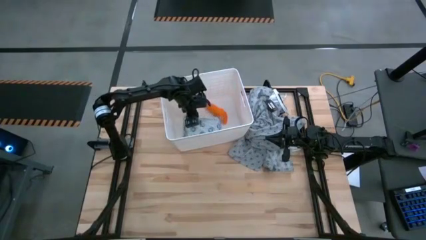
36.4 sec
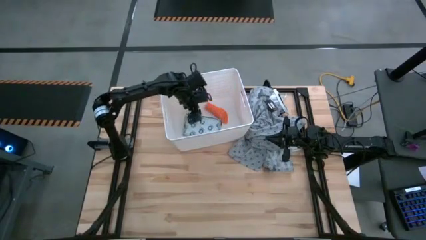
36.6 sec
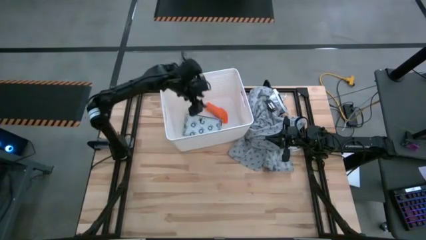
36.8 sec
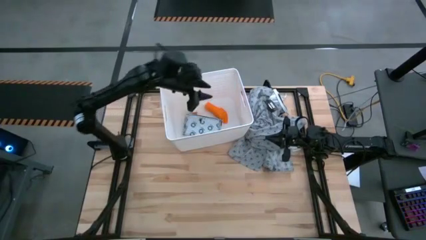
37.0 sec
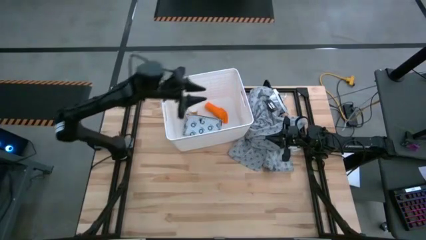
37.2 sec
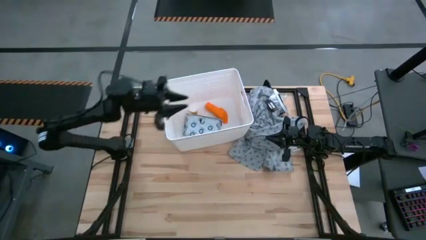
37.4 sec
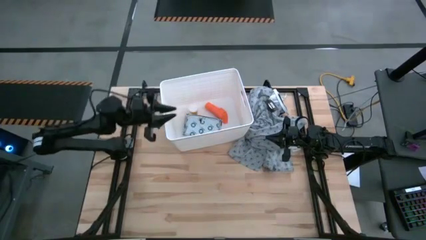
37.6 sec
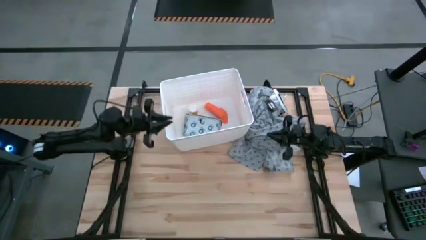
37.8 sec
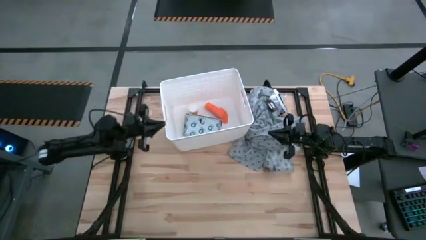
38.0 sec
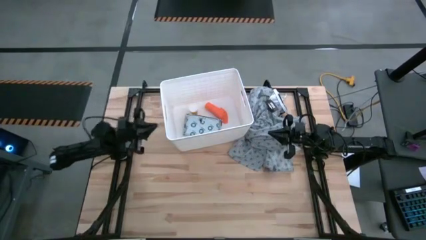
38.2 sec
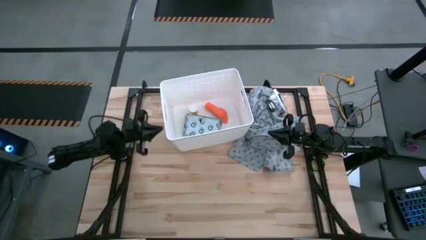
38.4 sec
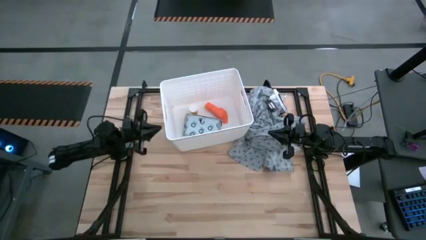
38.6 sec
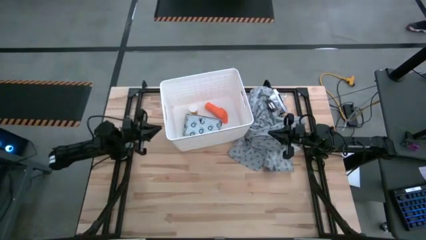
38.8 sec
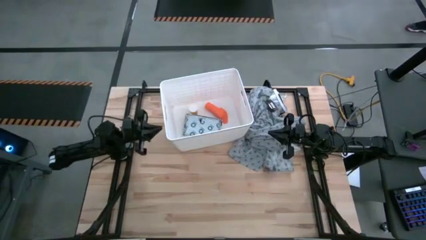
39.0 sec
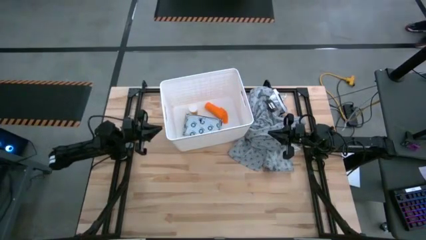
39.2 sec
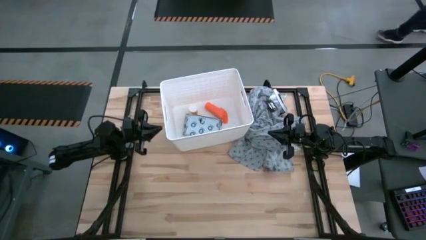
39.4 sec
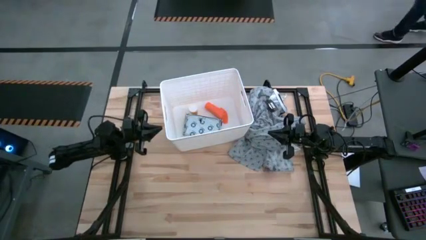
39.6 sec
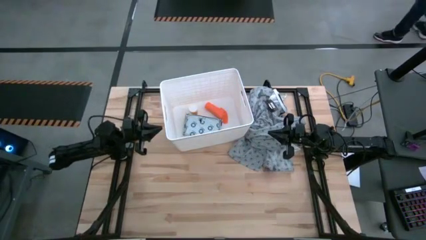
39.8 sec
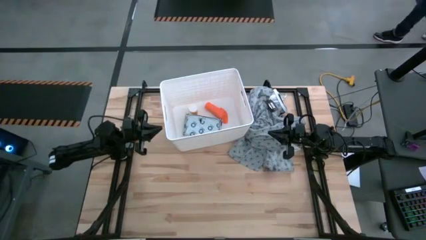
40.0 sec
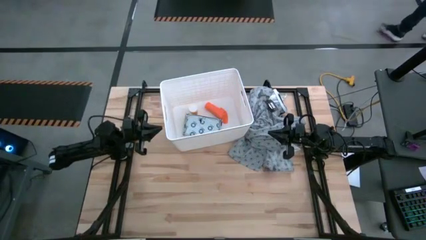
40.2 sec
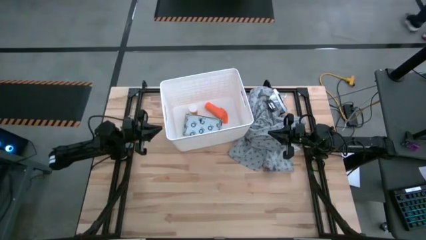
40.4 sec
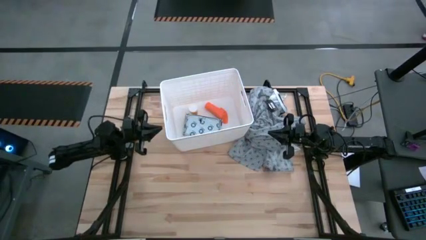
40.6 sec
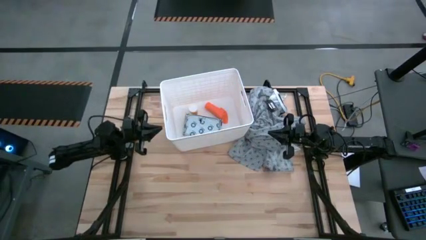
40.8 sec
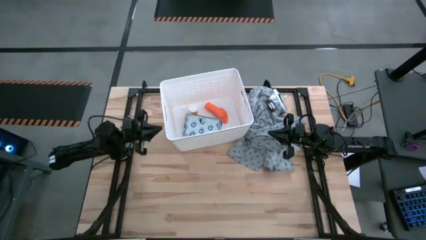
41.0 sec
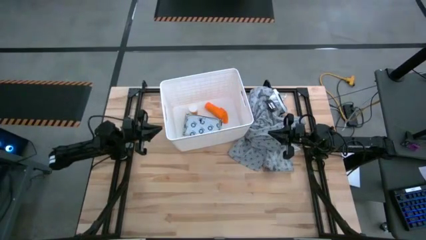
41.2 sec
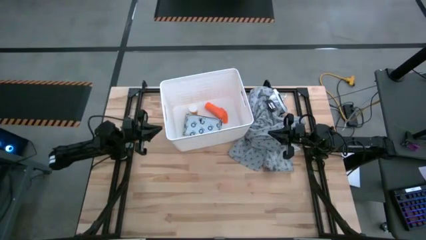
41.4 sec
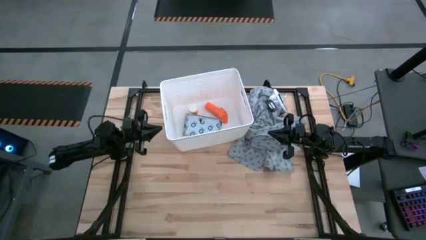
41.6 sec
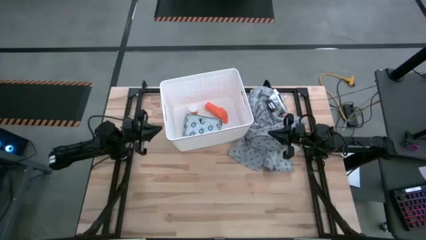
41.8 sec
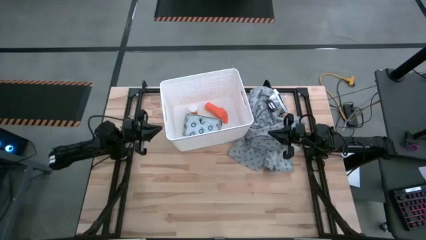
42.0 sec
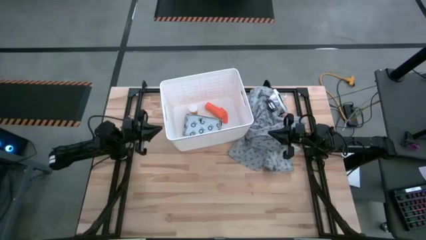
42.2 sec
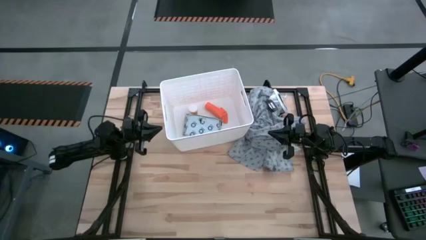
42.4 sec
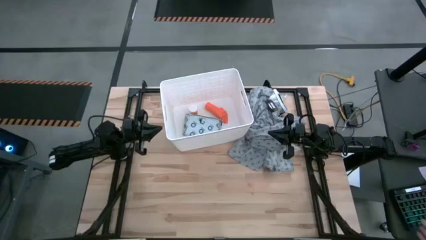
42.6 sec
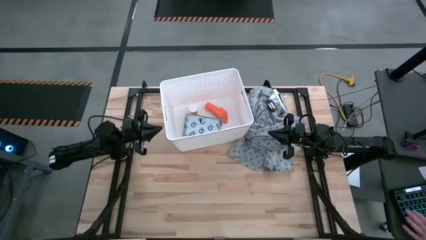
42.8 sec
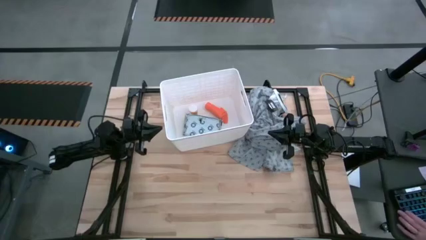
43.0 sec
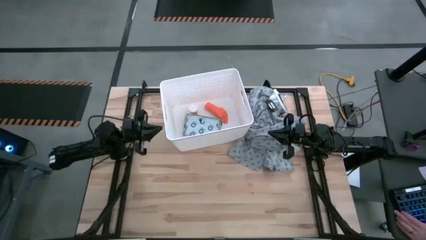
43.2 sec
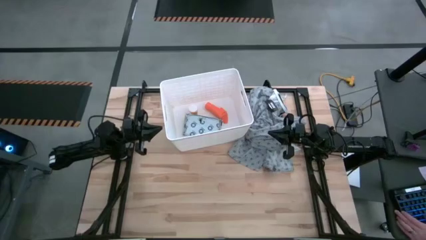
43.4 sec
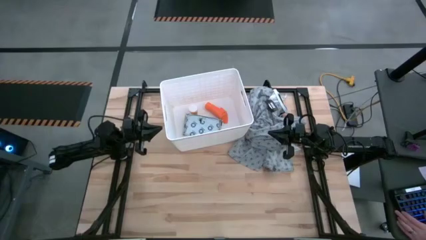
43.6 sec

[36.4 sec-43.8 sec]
Task: Pick & place medical supplies in basket/bin
Return to Home Position

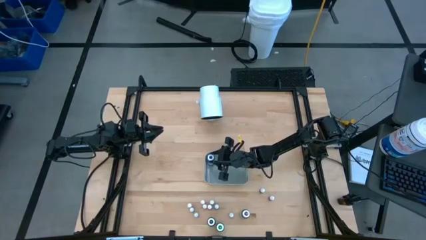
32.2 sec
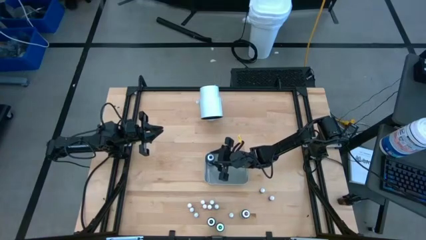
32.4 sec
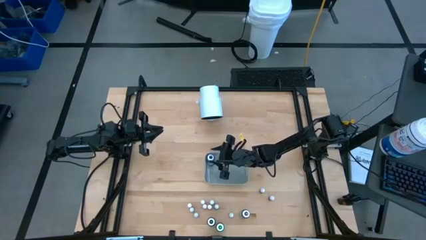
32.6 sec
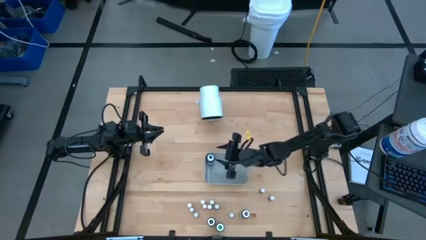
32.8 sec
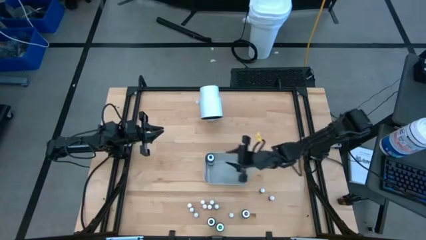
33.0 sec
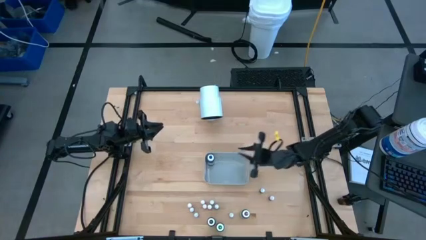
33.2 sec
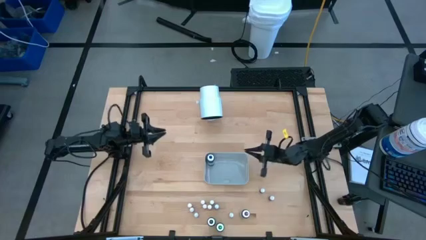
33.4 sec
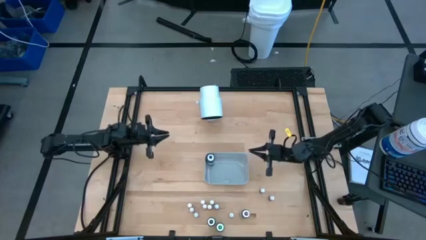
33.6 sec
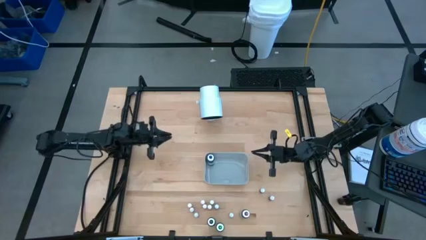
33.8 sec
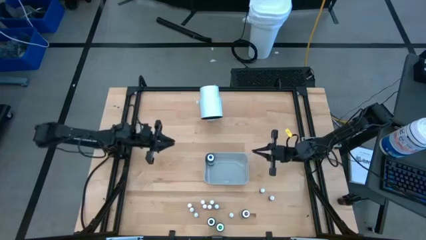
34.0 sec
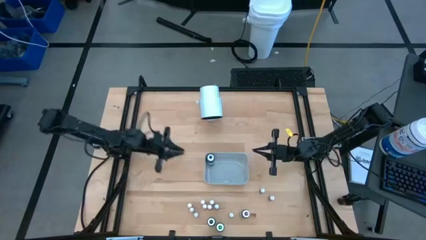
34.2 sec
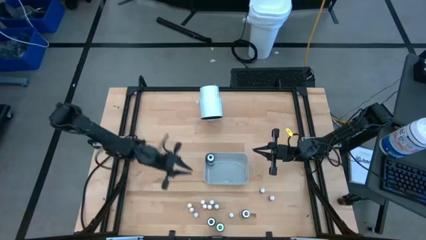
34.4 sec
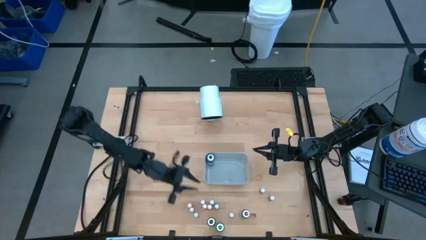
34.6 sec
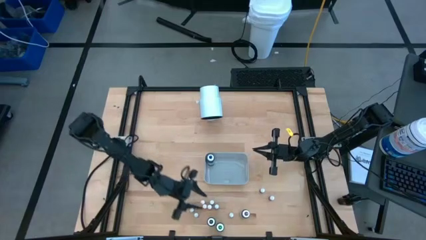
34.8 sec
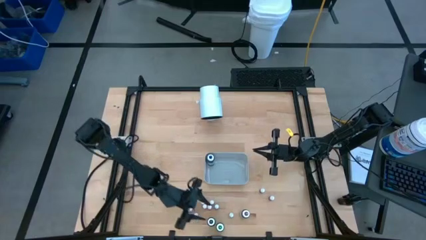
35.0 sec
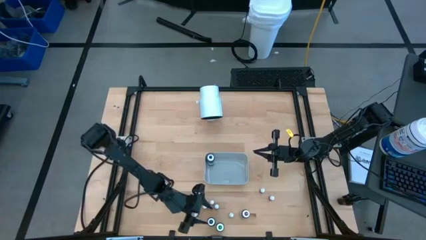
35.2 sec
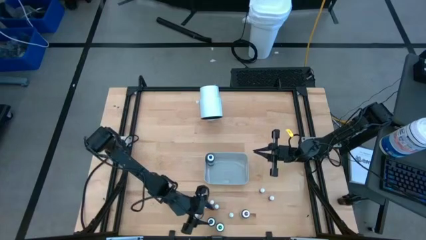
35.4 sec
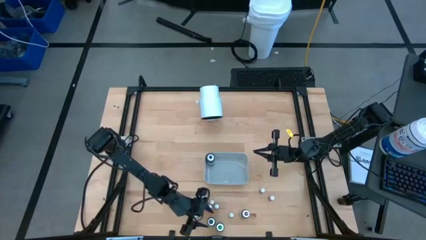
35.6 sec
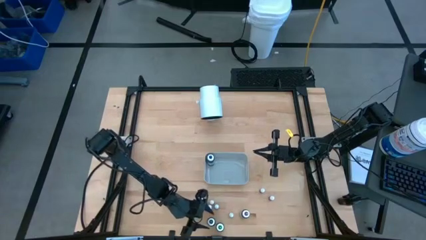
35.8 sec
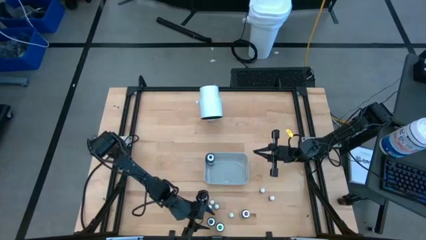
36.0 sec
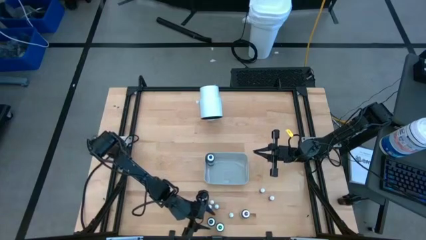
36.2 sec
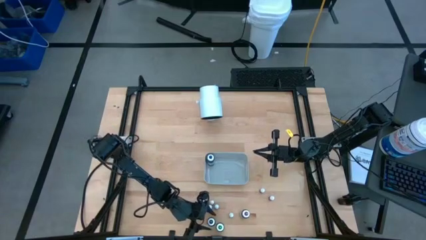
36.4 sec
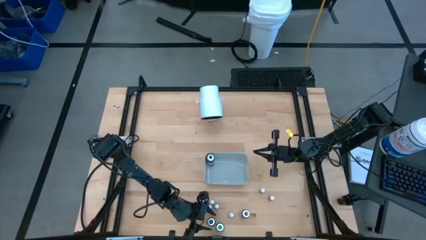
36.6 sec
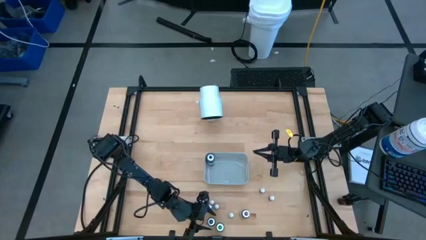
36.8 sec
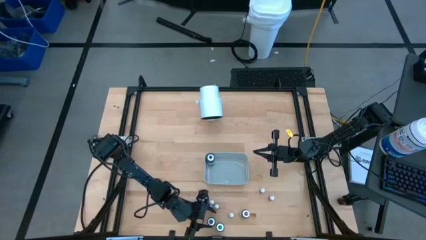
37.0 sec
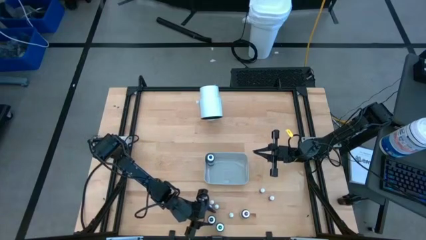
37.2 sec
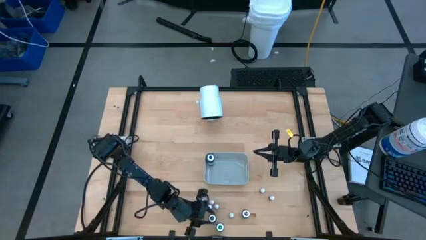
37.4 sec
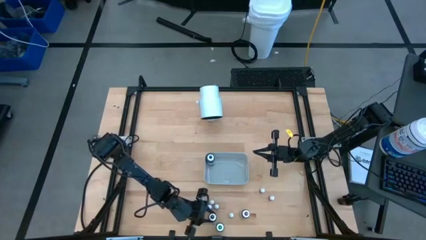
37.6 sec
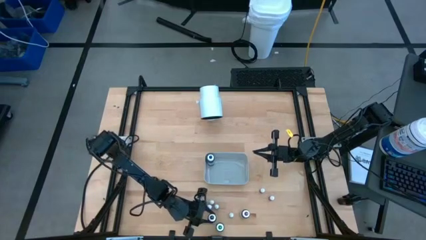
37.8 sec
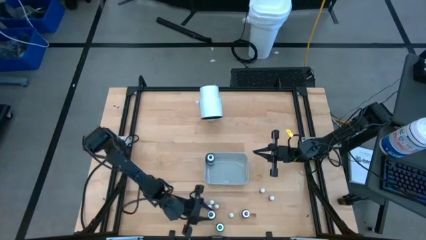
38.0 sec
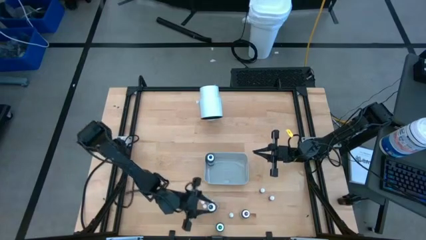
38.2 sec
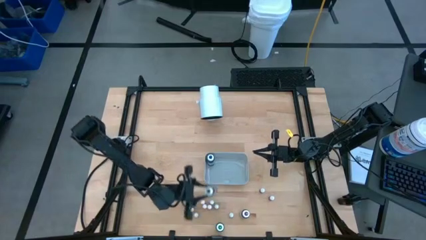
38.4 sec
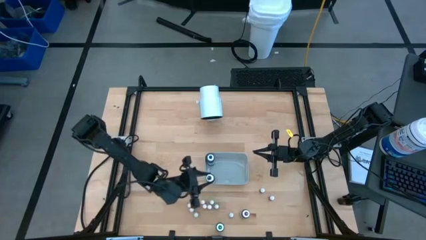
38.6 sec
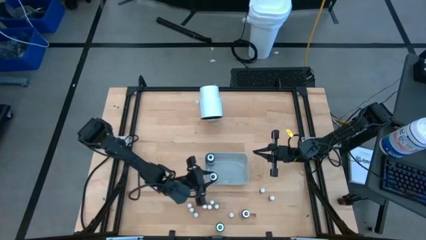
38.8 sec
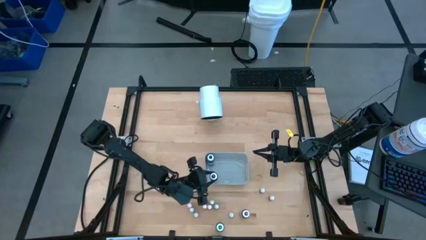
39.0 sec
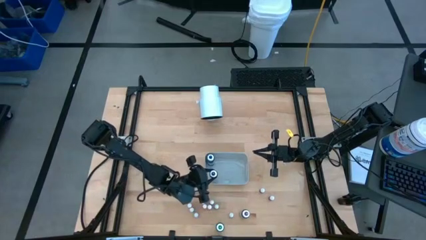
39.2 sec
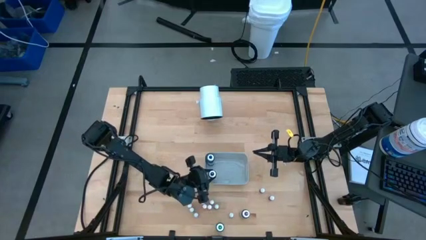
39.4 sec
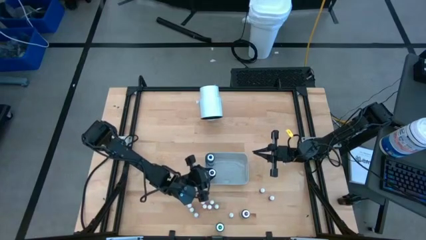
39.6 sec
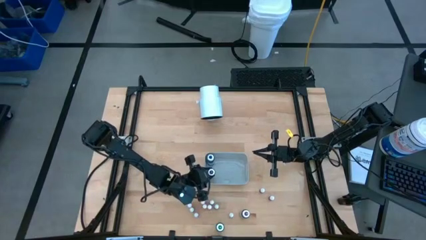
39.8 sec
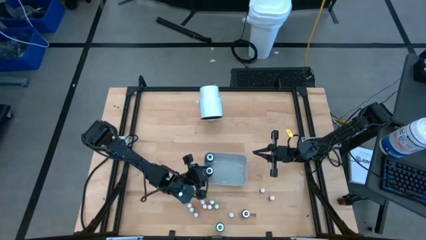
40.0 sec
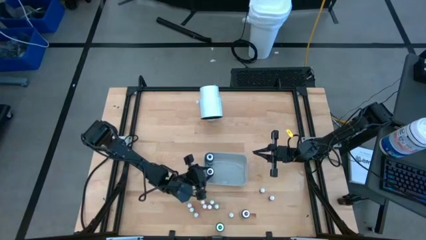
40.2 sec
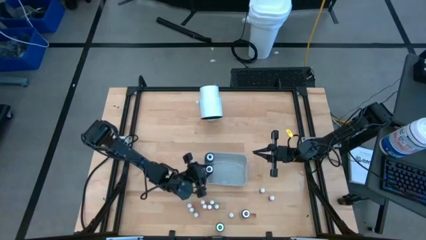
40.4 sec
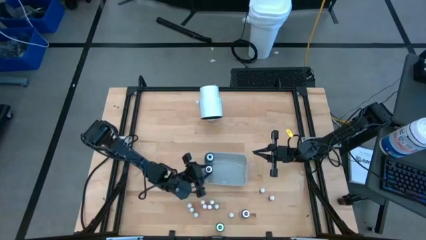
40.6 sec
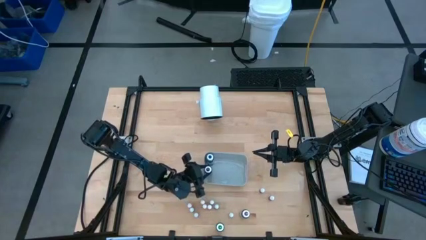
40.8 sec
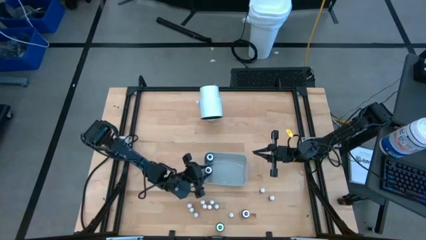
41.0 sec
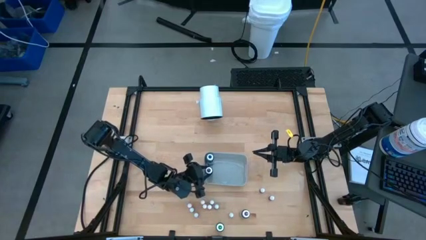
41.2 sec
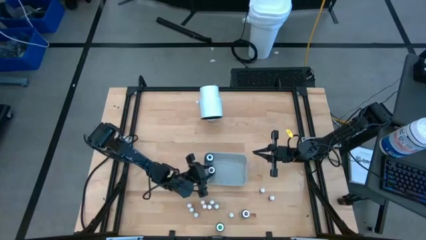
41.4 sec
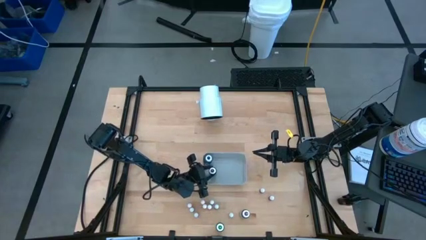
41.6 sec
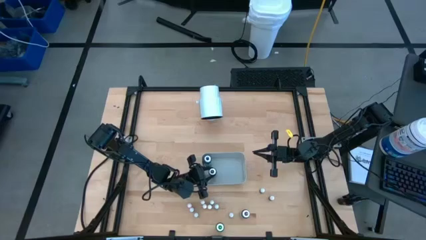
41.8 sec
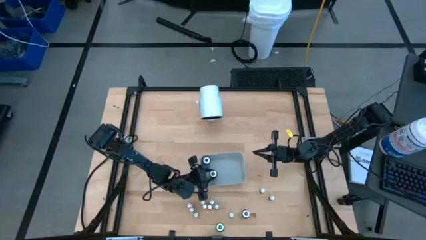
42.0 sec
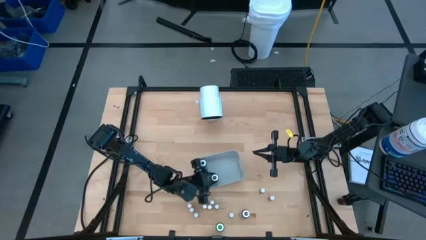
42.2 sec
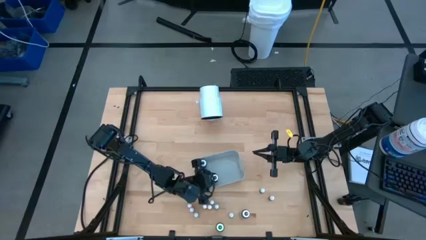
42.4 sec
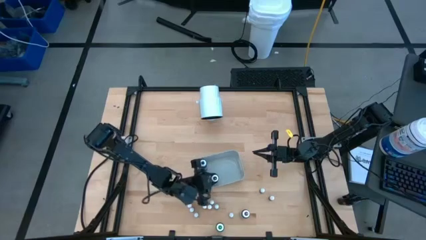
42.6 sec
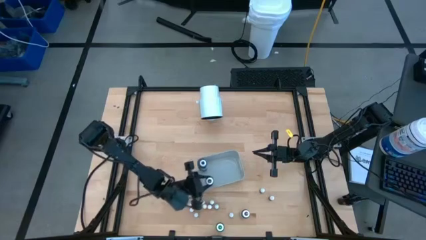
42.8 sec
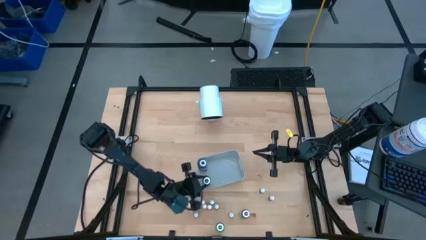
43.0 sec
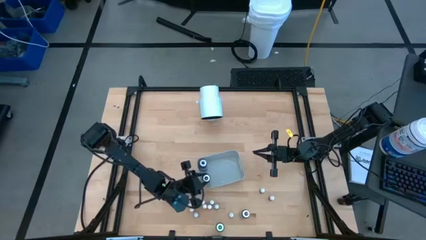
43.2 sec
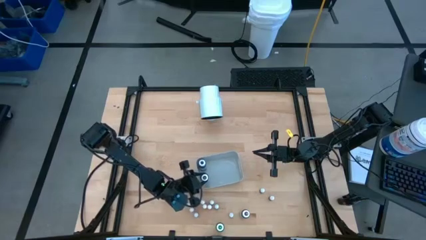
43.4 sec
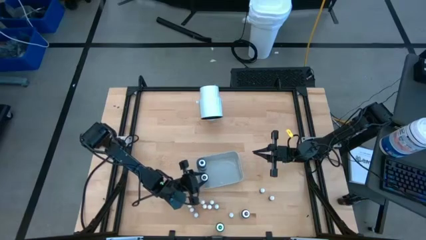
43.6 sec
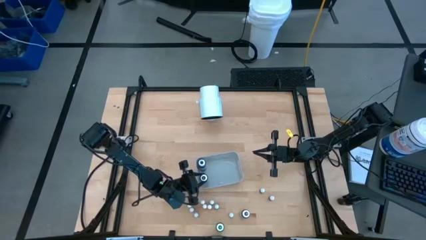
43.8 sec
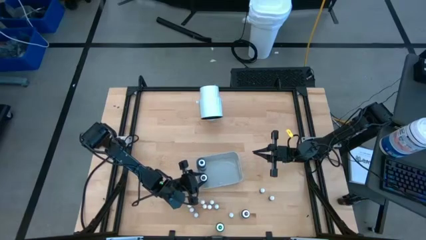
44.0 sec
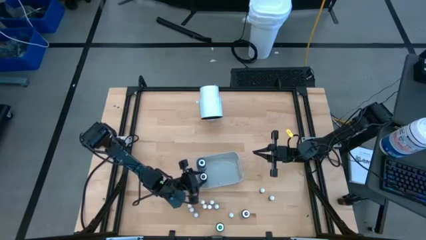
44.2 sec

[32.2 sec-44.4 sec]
Task: Pick & Place food coloring
Put the large black food coloring bottle into the gray bin
